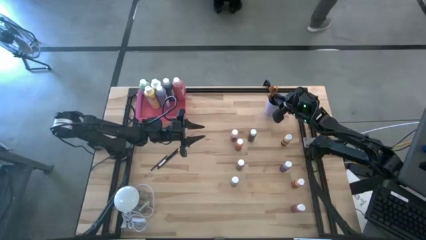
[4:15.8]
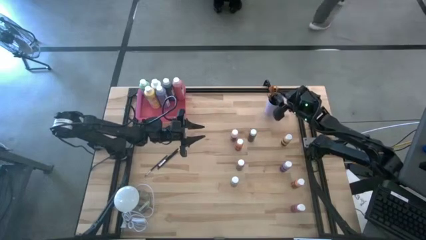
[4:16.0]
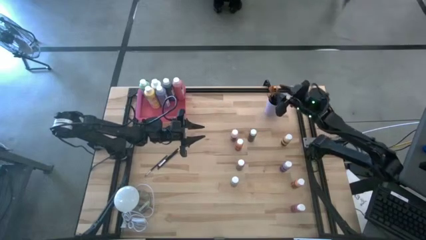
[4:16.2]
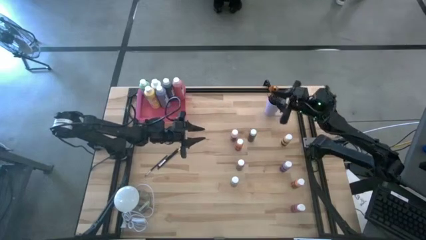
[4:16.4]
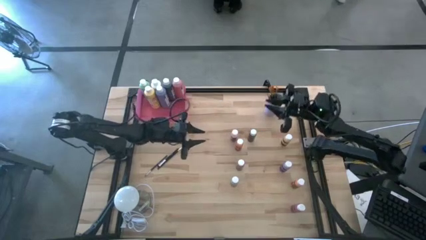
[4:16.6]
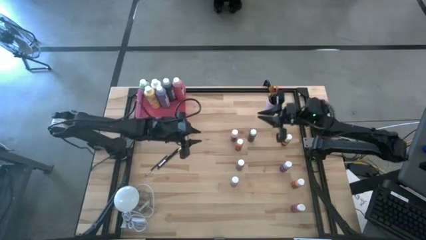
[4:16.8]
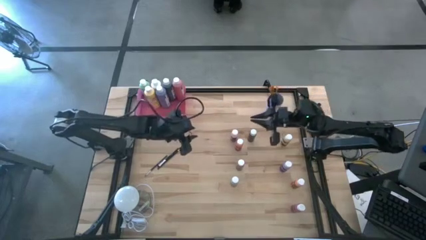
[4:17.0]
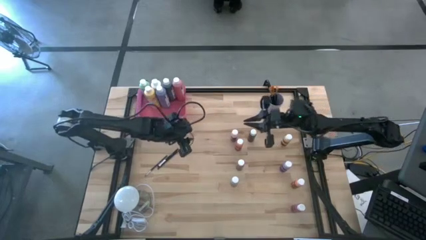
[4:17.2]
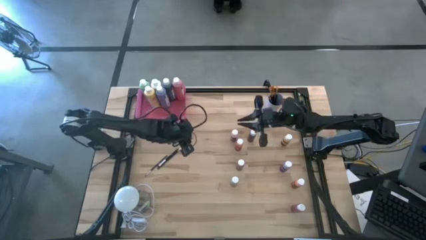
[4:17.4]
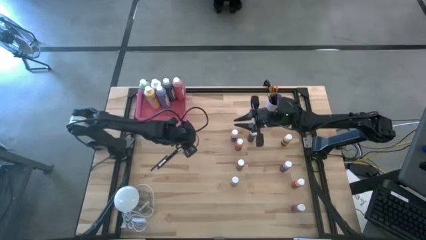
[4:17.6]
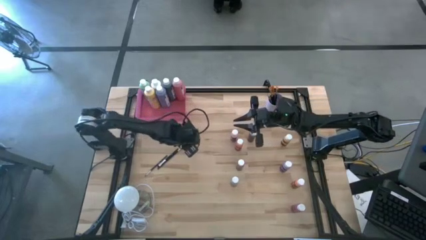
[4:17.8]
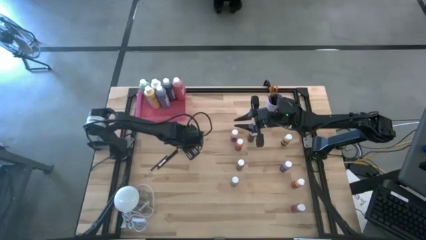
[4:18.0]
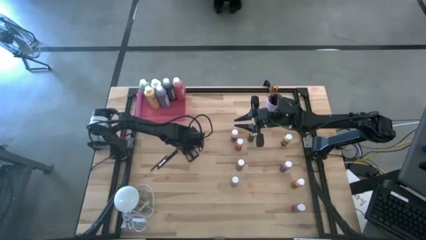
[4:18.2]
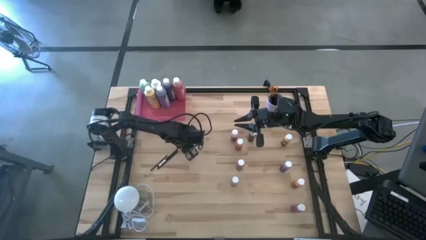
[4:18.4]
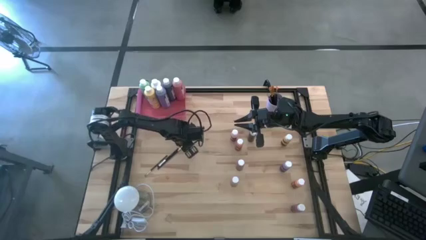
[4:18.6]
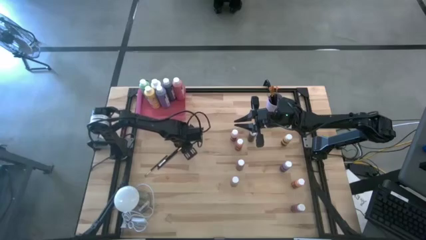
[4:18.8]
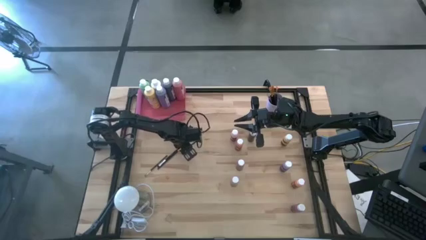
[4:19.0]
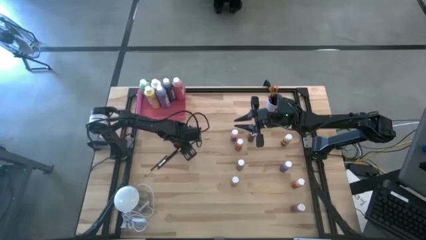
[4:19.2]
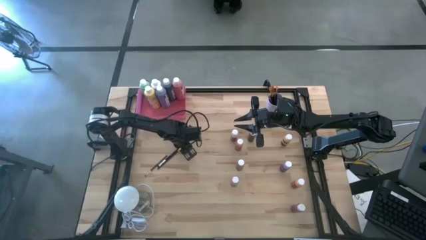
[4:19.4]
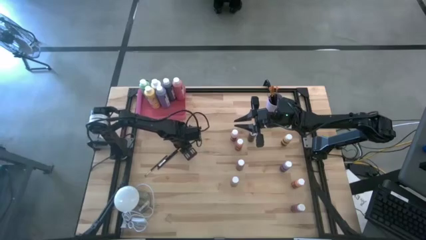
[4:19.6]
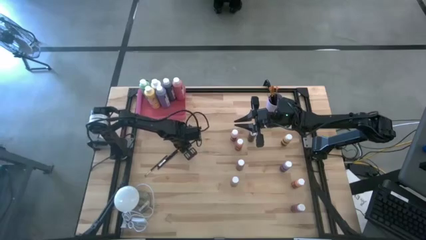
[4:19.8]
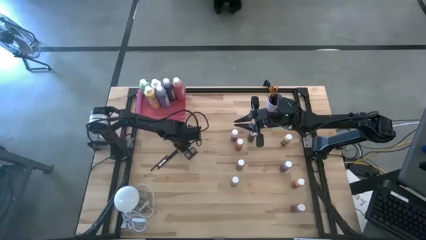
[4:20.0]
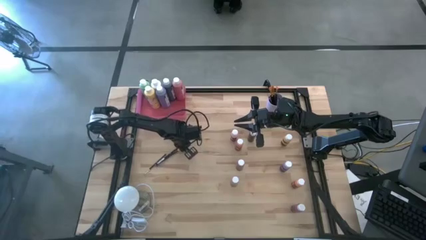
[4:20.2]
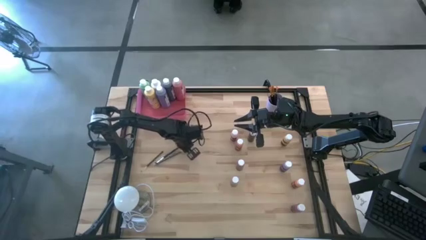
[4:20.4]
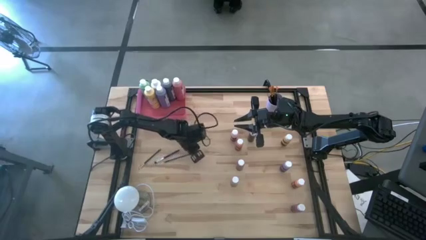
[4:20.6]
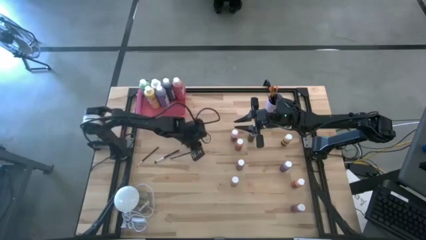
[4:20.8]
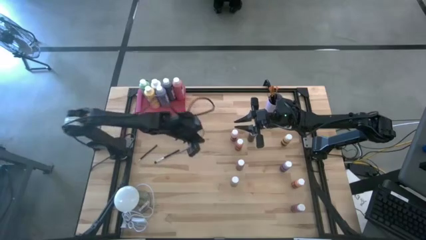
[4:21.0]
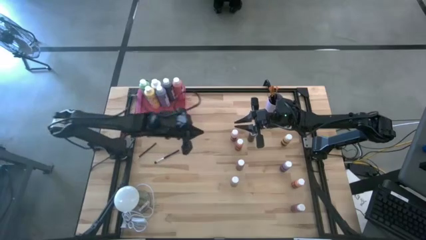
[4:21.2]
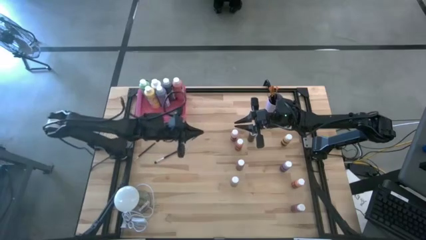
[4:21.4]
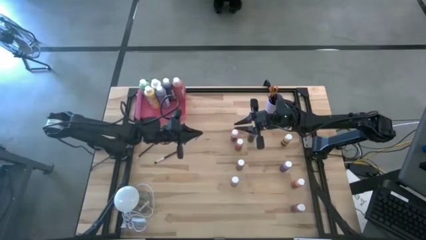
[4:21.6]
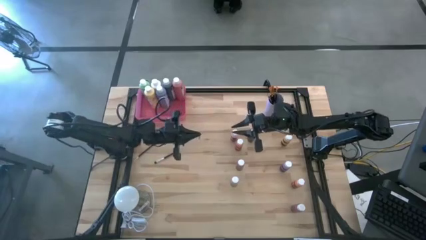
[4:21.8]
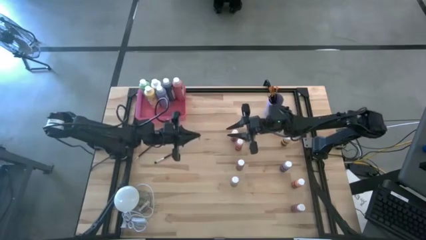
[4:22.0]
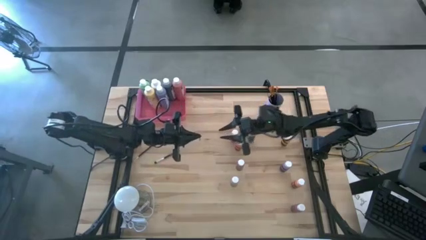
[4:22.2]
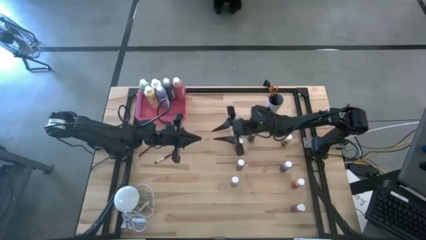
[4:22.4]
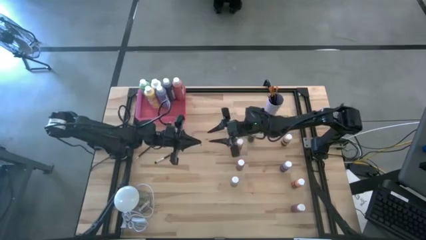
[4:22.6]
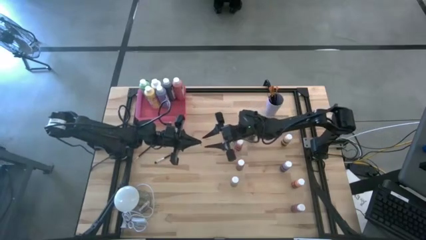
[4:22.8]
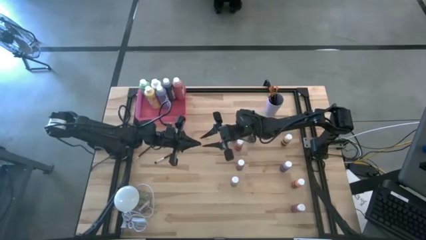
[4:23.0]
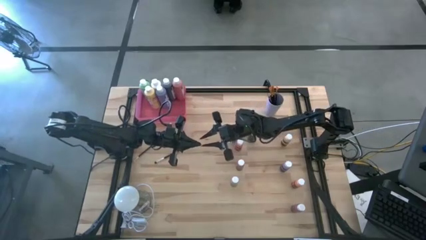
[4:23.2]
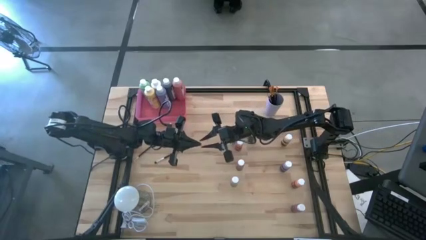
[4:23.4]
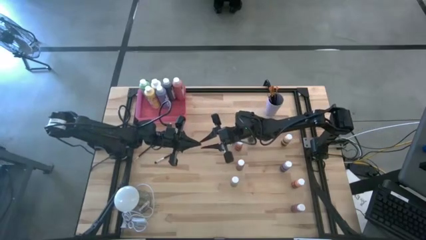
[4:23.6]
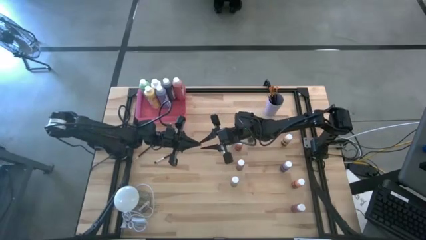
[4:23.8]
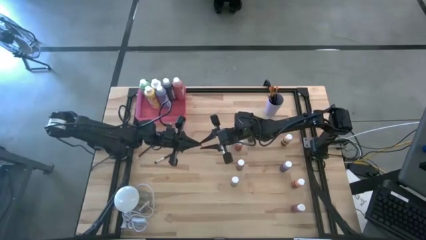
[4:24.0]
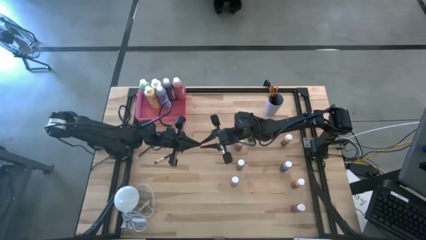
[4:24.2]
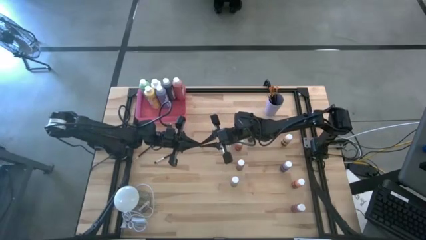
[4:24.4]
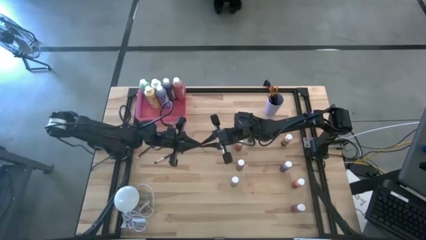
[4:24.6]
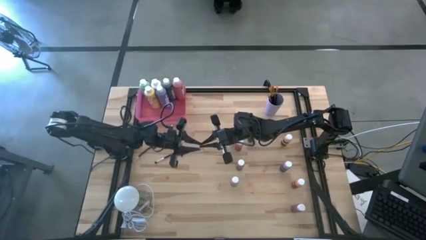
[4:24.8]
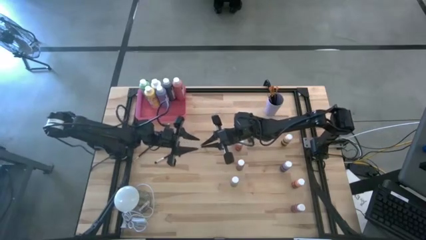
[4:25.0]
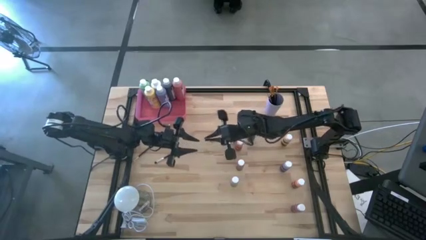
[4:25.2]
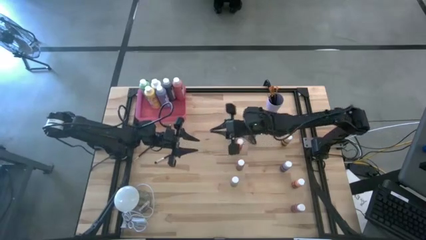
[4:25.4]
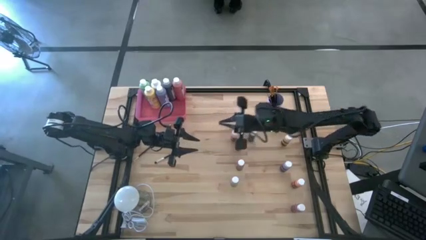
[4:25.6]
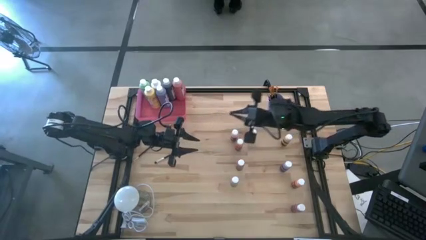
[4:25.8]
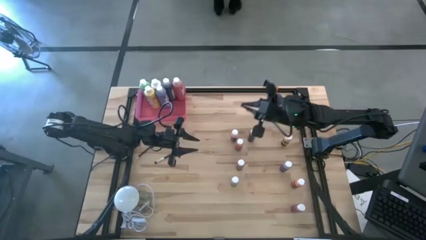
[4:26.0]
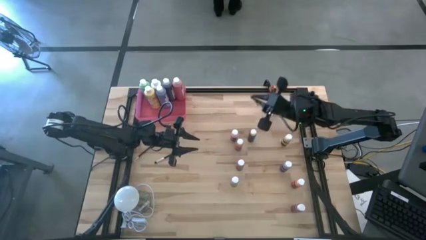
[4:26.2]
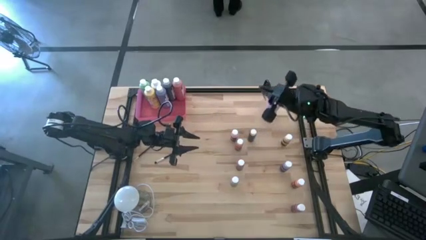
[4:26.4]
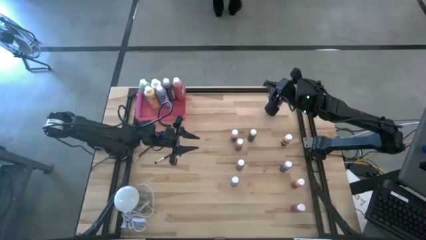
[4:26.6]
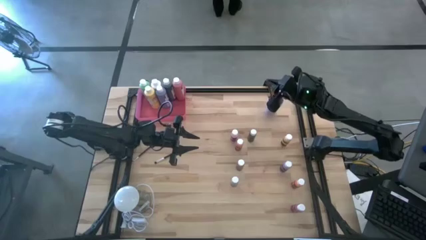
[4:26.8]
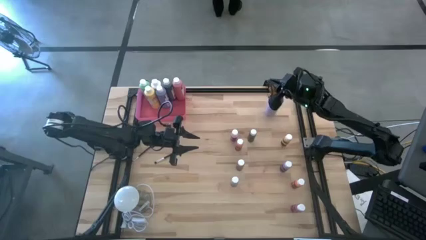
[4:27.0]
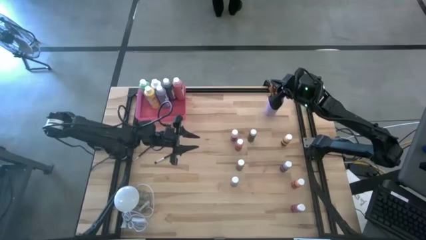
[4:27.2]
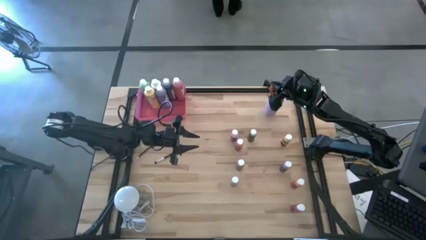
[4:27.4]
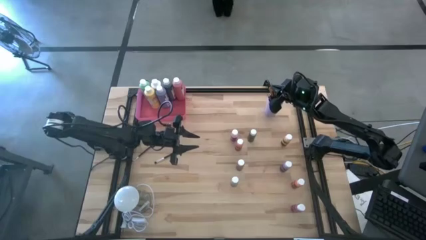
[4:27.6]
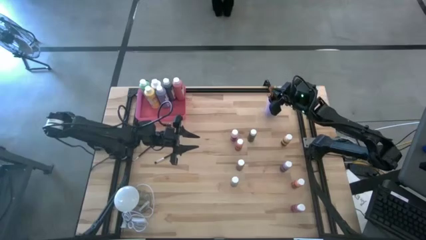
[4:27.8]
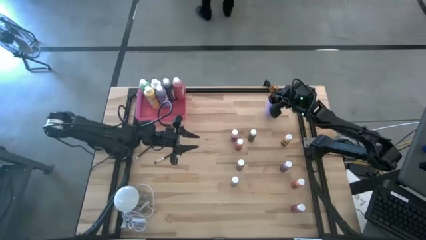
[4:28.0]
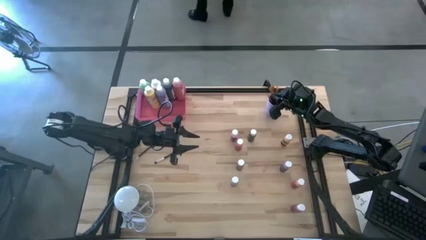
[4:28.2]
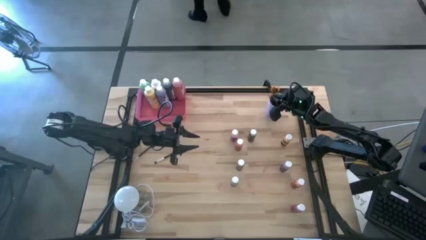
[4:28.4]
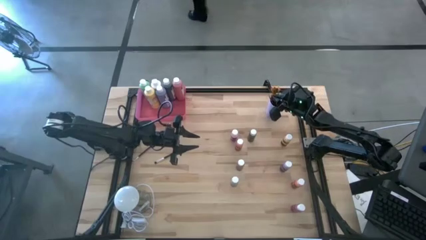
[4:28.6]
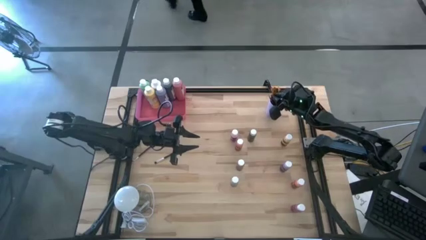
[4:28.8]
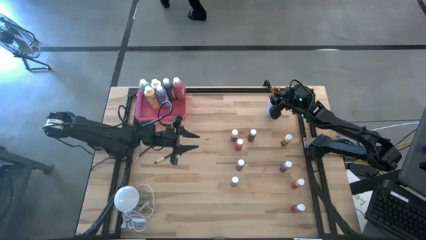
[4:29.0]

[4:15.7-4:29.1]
Task: Pick & Place Paint Supplies
Put the gold paint brush into the purple cup

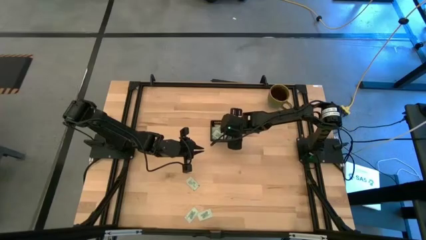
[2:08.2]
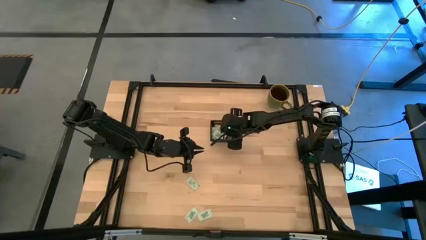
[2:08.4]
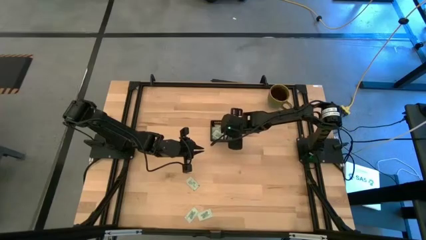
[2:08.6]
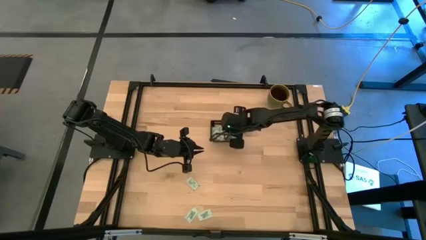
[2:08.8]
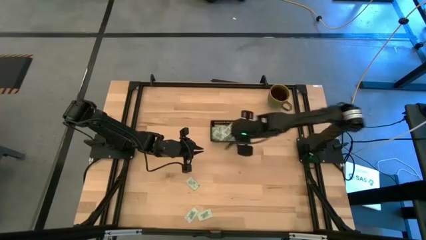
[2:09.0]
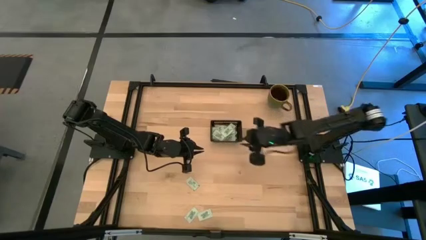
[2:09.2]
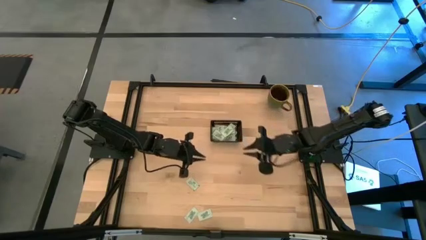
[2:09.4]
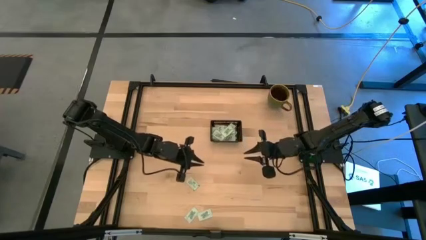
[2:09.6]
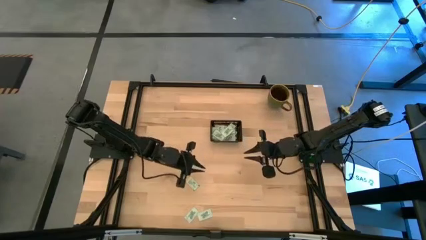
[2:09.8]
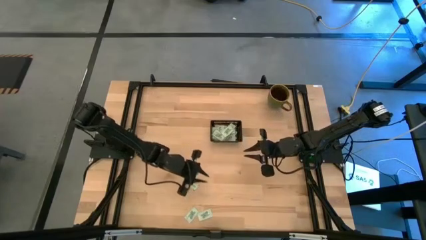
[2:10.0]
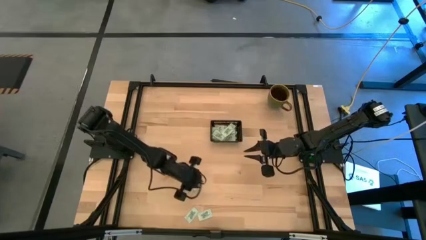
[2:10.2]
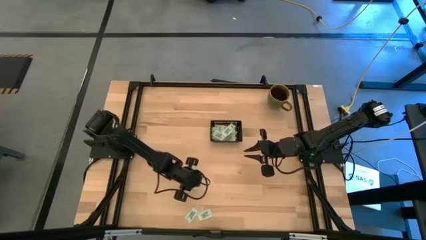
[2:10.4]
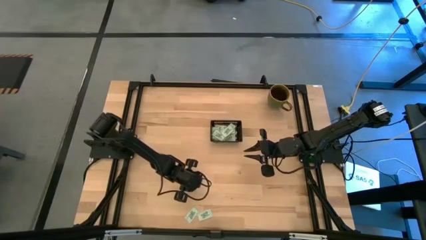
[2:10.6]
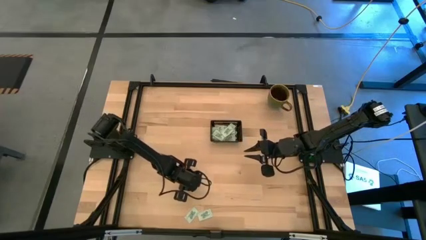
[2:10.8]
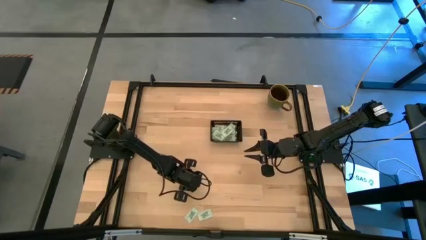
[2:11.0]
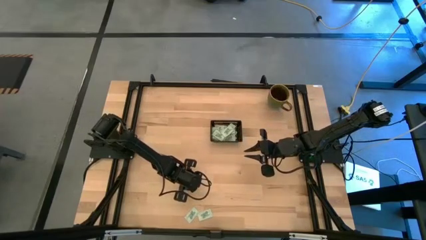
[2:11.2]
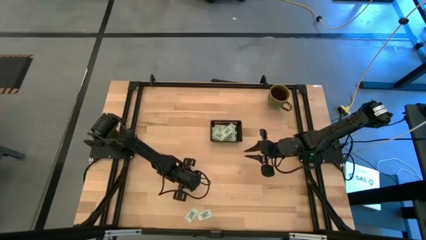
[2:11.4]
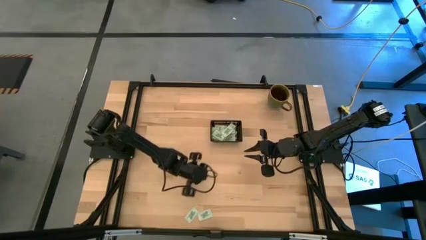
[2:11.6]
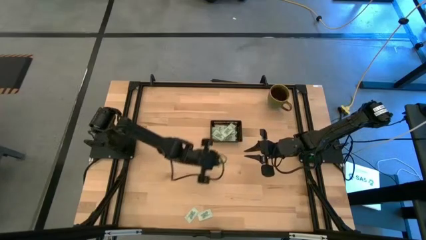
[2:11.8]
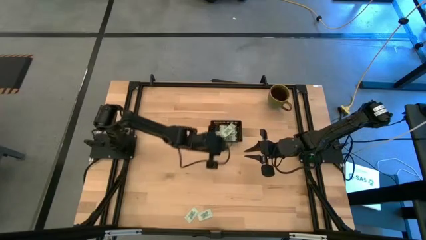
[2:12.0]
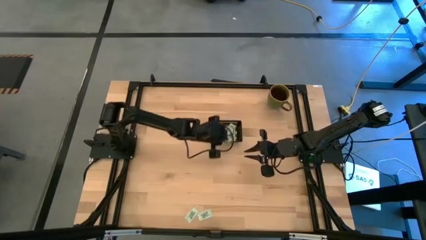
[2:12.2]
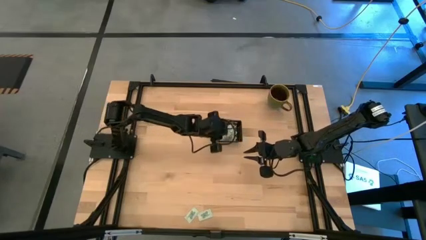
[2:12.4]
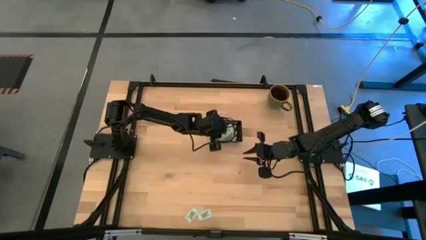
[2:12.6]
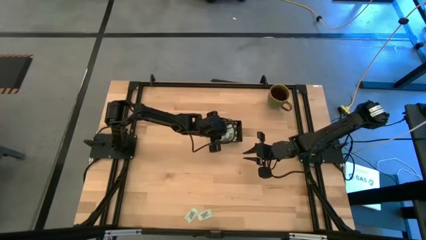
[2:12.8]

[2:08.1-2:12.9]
Task: Pick and place Stevia / Truvia into bins
Put the top stevia packet into the black basket
